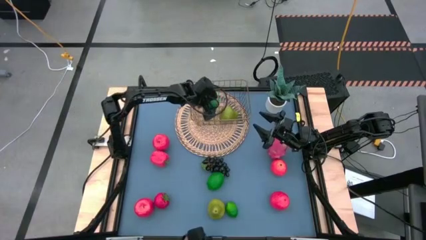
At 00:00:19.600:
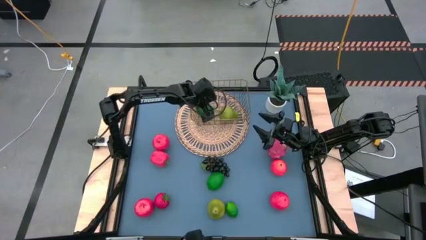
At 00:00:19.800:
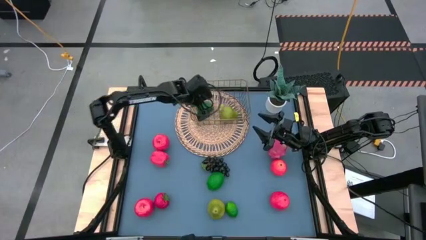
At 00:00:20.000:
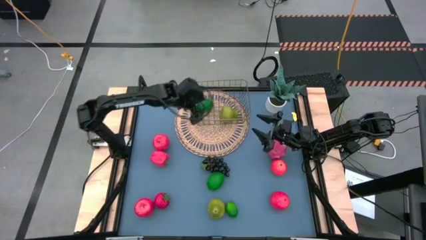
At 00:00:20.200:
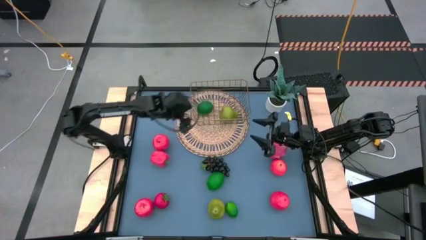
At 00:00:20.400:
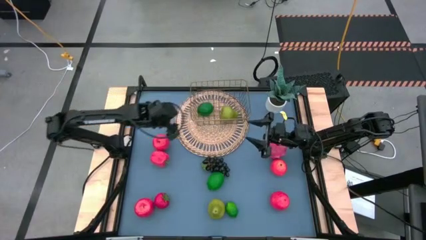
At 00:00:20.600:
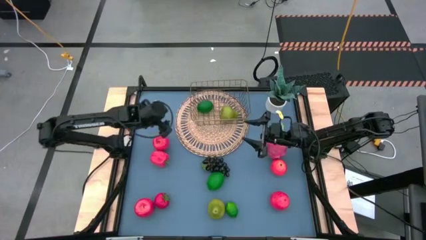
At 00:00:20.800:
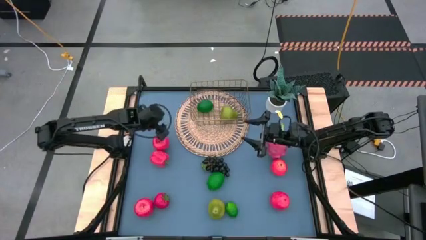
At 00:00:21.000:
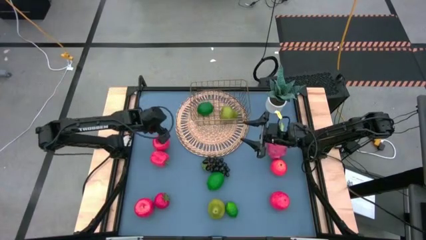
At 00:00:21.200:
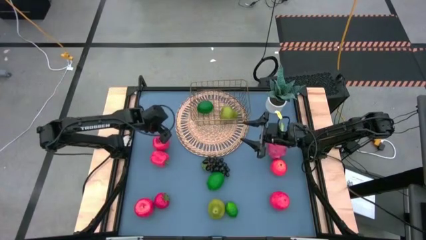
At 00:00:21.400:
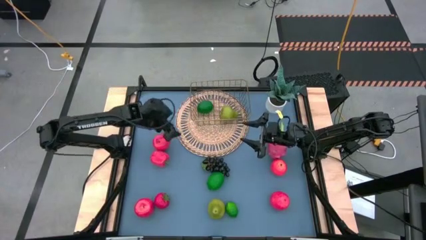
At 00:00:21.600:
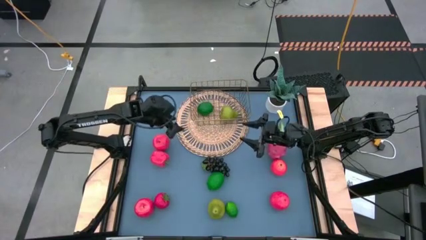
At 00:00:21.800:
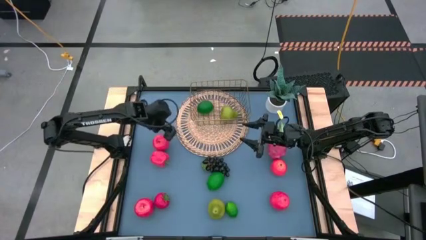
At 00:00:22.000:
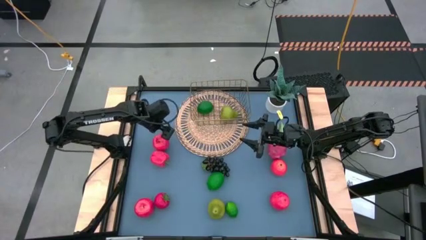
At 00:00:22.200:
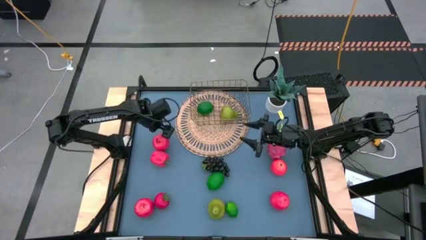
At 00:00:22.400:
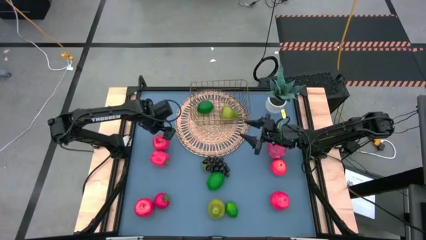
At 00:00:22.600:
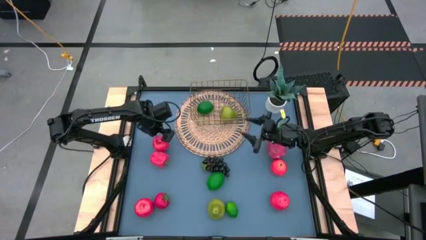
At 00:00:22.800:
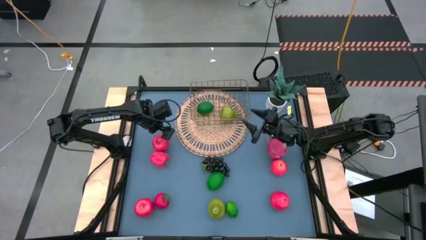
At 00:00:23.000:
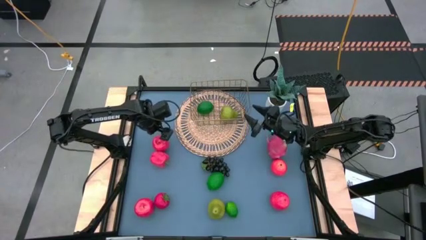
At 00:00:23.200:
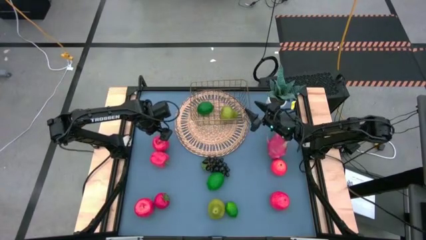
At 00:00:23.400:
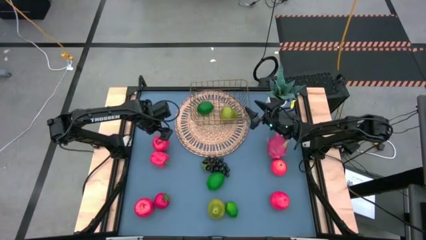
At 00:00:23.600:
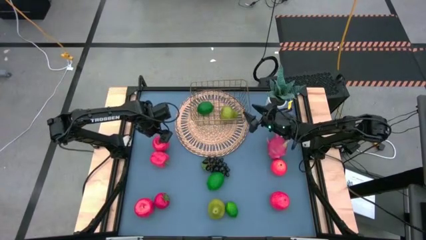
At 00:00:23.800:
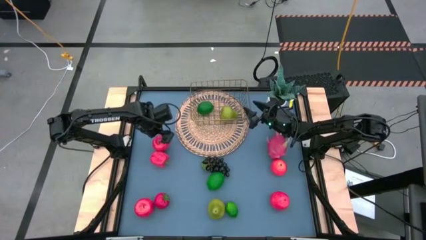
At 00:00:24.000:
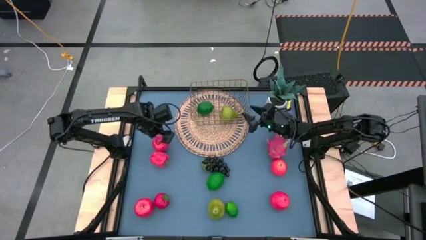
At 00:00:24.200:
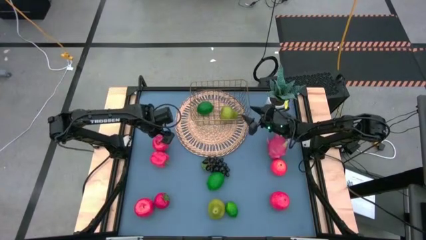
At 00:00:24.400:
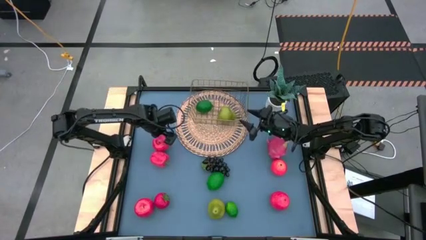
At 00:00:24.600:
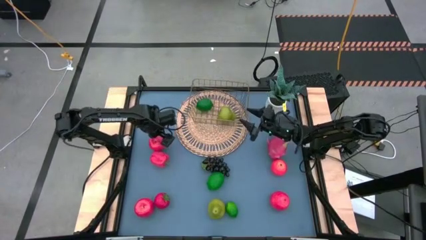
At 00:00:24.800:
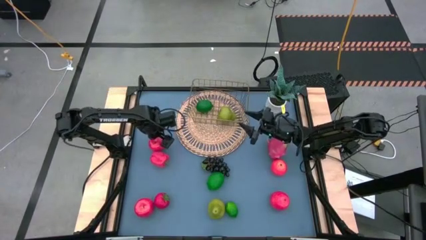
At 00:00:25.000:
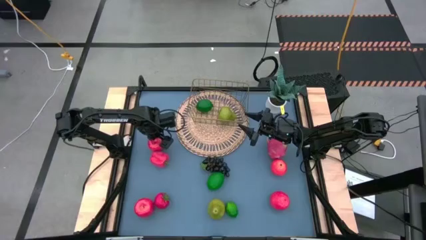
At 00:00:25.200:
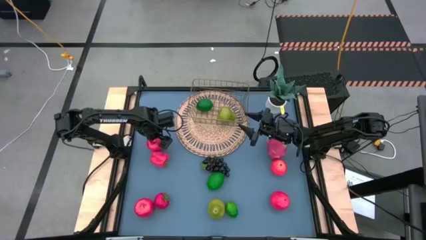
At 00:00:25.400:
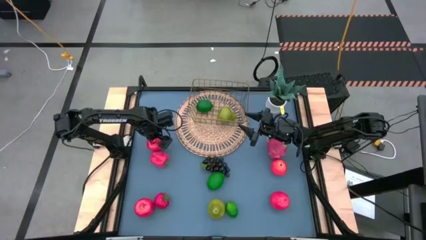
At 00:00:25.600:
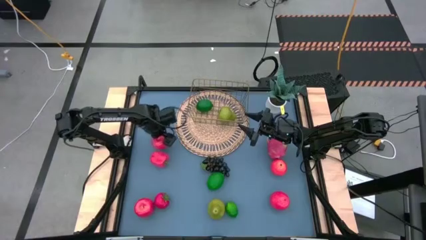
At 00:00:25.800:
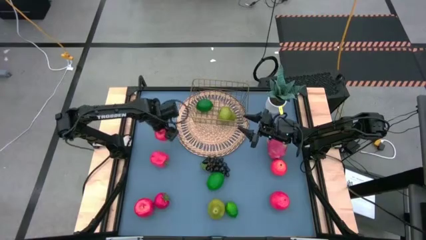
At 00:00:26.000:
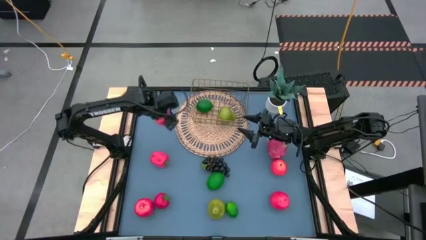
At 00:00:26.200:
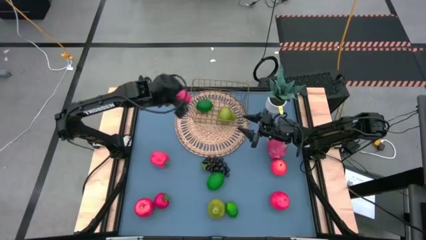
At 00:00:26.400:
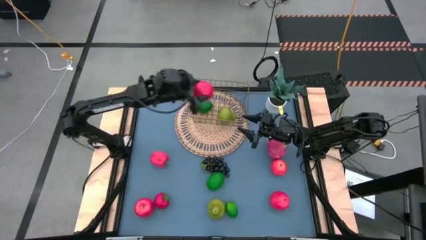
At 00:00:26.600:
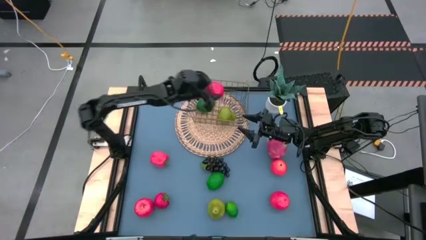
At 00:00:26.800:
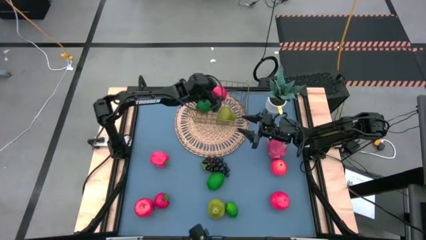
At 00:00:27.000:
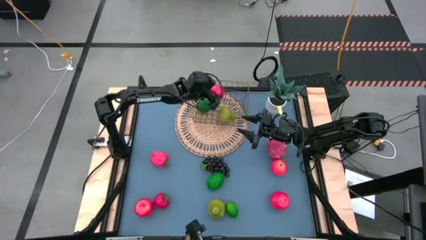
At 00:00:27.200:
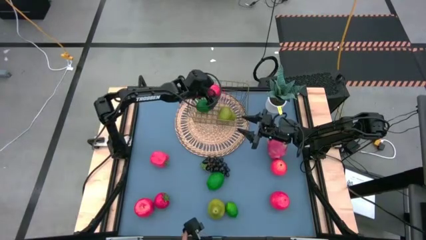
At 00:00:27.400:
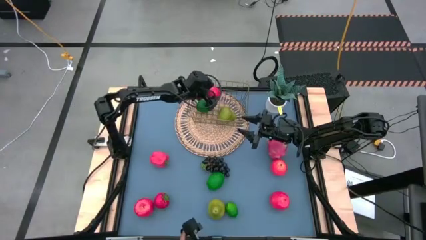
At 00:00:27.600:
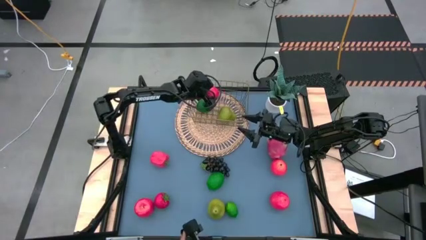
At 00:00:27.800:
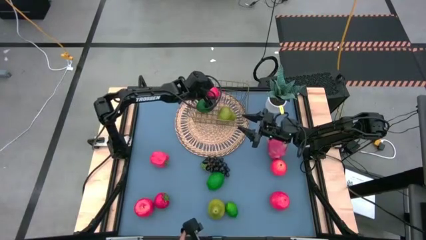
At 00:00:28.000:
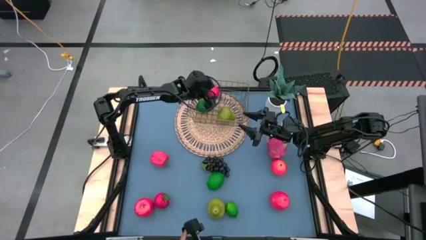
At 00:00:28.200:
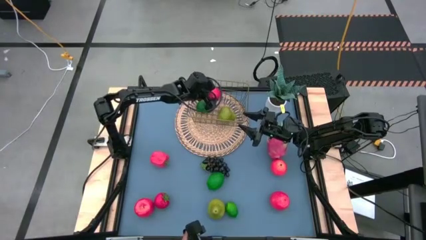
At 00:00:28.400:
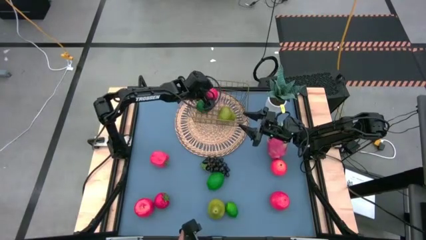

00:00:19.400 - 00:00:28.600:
Task: Build produce basket
Put the top left red apple into the gold wire basket

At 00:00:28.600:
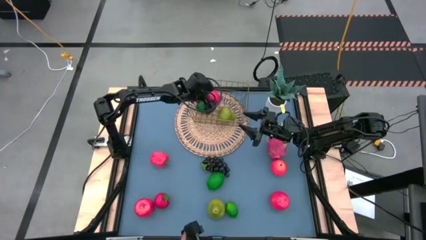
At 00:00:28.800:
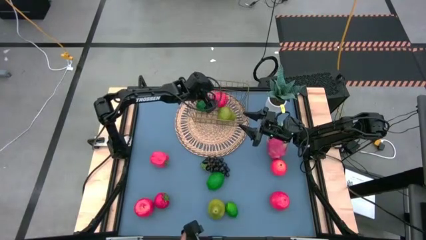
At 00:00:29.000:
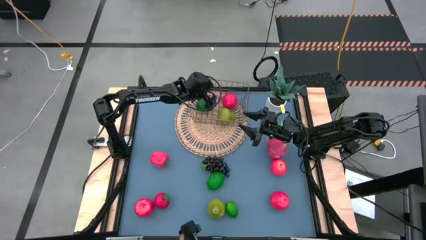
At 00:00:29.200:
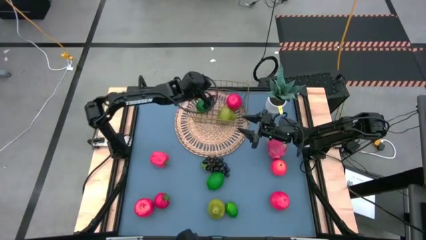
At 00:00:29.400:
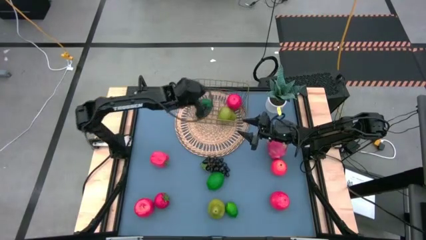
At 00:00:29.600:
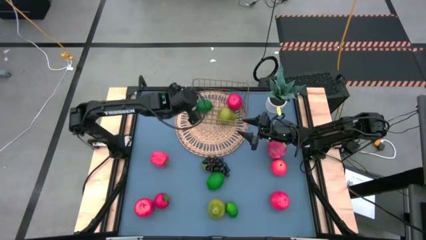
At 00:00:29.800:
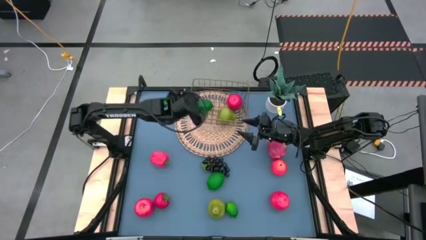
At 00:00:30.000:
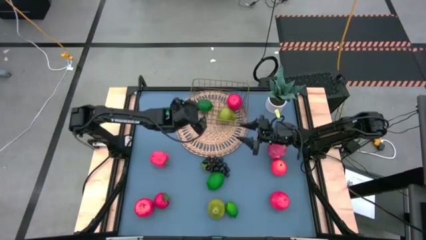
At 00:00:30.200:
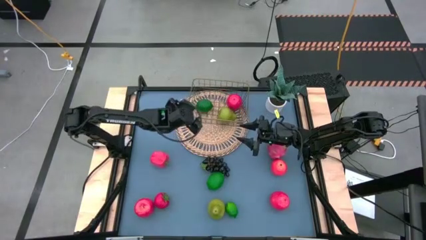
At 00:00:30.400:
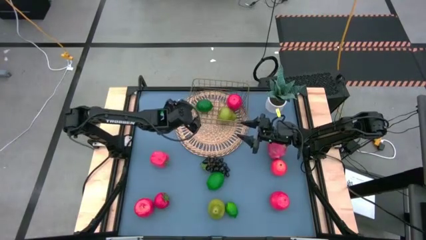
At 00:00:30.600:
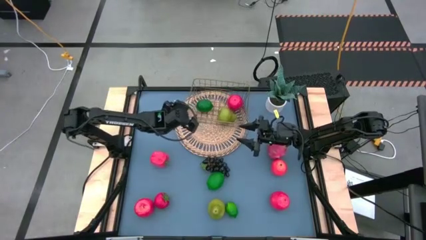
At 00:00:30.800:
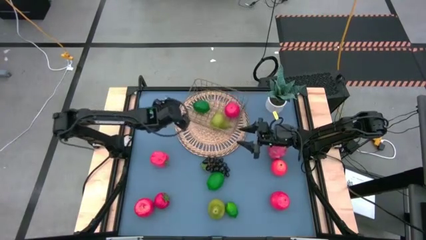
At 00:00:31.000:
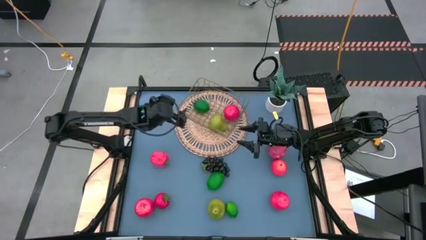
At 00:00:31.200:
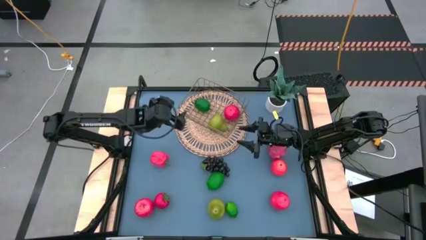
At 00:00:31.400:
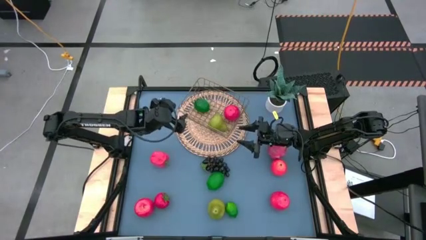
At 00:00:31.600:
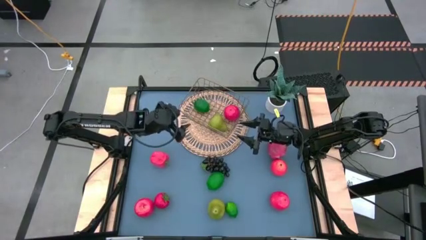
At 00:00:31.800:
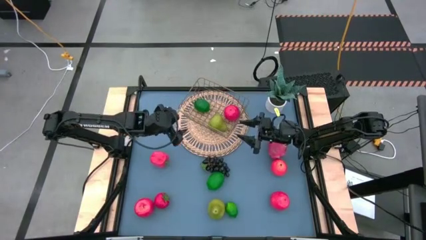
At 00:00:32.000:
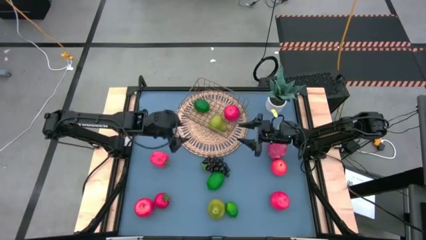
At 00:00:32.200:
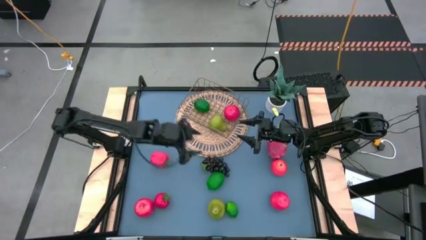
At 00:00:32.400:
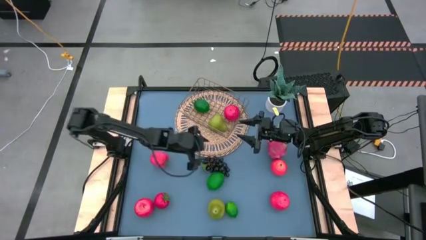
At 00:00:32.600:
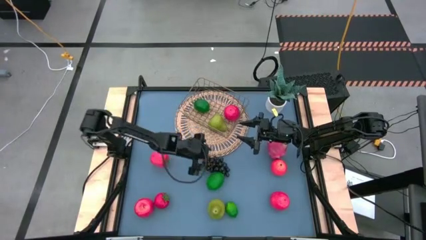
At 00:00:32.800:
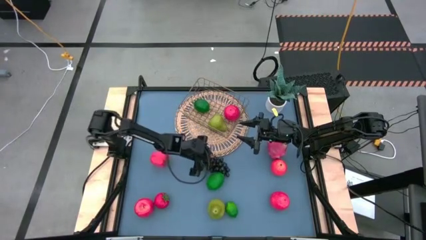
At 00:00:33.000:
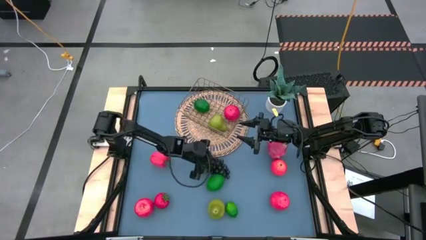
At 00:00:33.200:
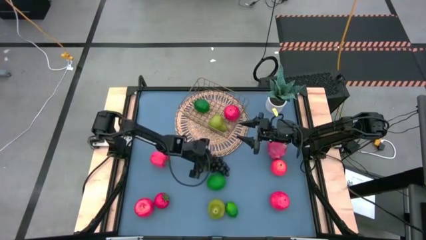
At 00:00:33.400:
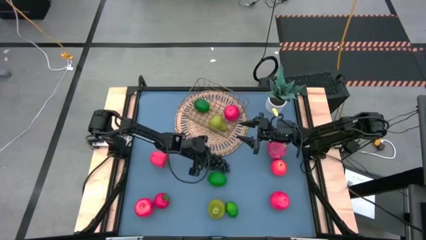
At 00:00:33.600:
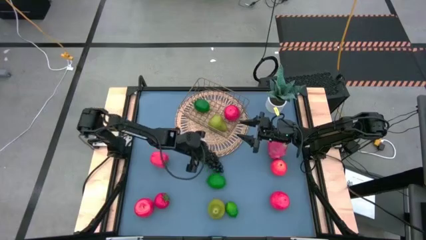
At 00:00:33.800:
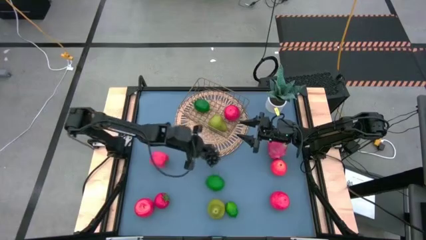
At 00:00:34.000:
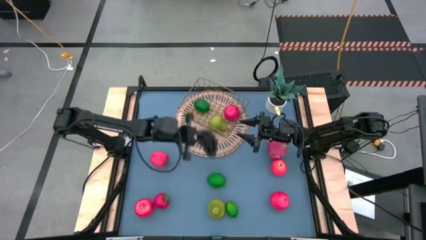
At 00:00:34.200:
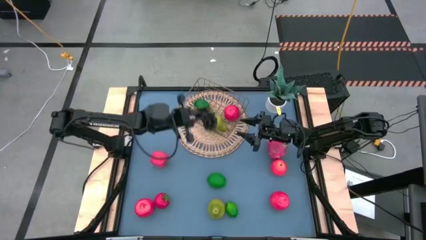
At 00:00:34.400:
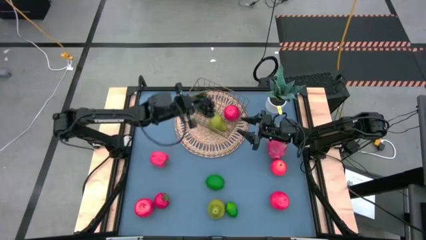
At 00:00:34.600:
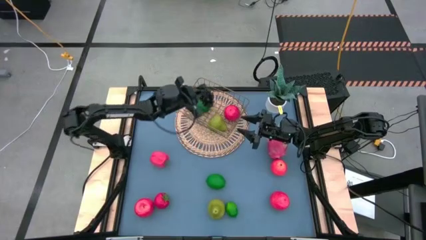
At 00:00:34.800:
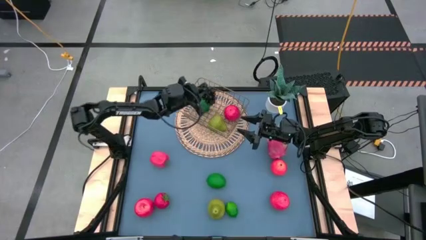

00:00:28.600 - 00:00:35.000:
Put the dark purple grapes into the gold wire basket
